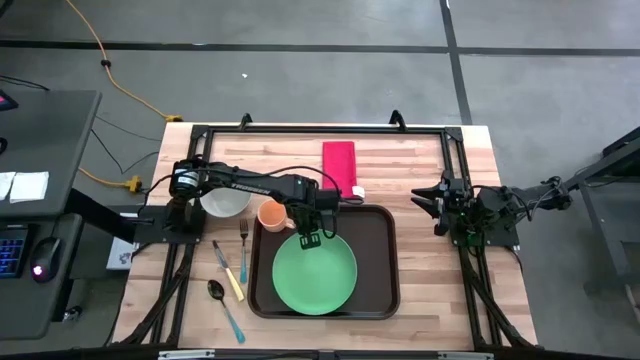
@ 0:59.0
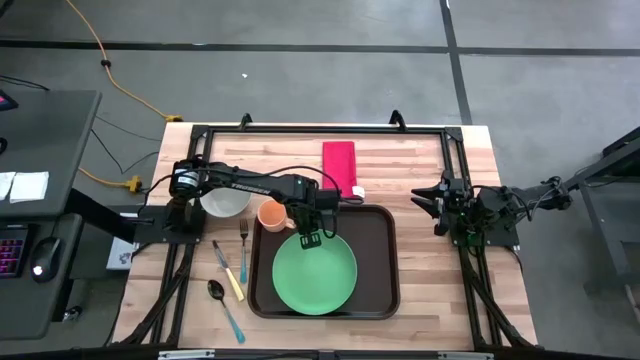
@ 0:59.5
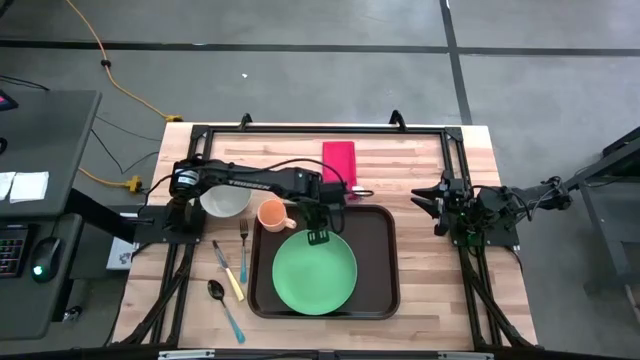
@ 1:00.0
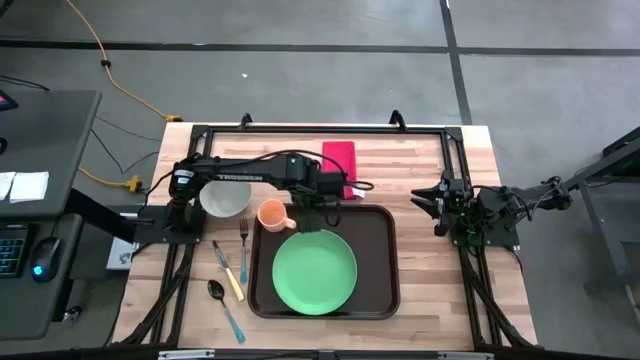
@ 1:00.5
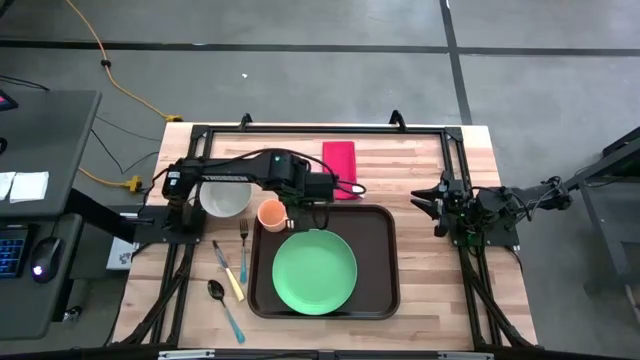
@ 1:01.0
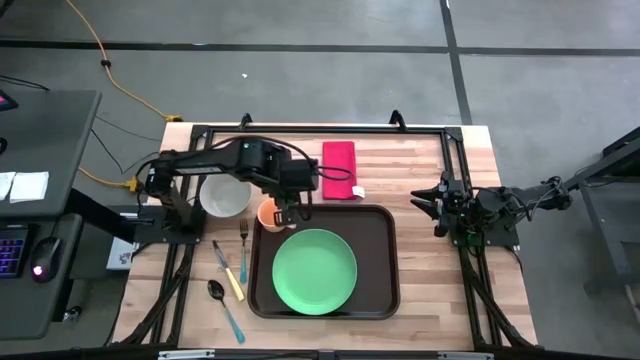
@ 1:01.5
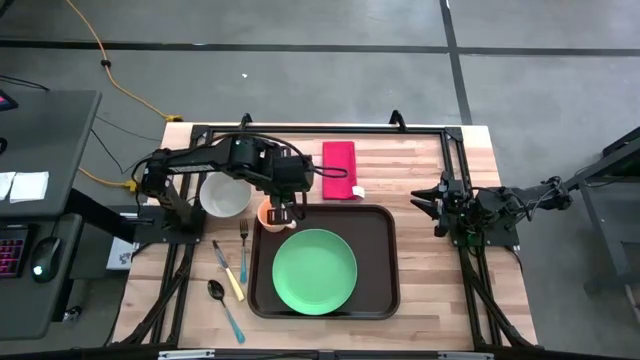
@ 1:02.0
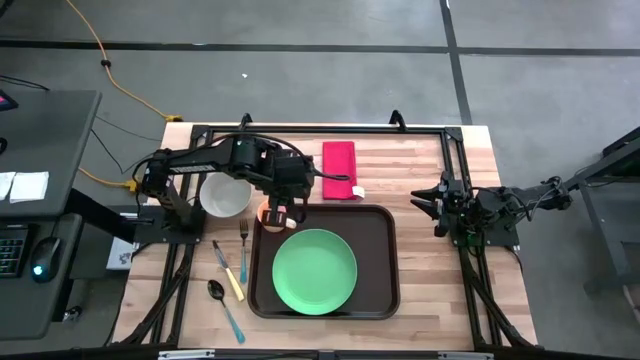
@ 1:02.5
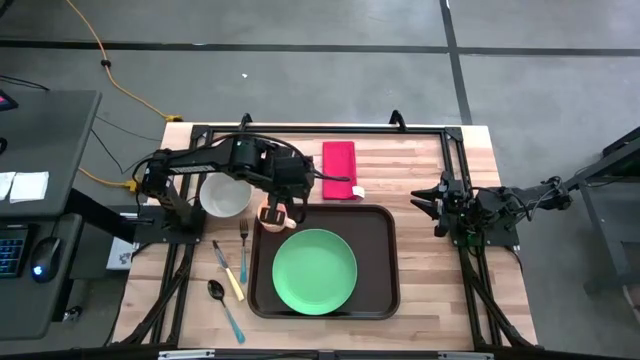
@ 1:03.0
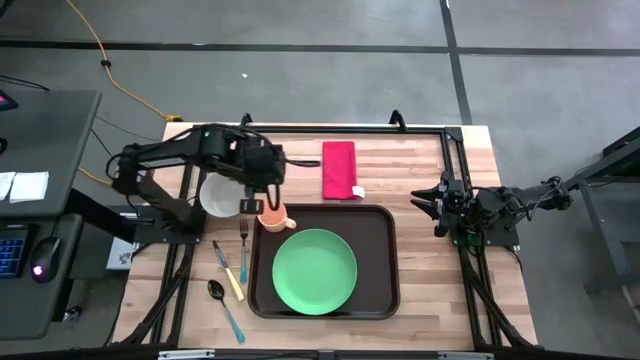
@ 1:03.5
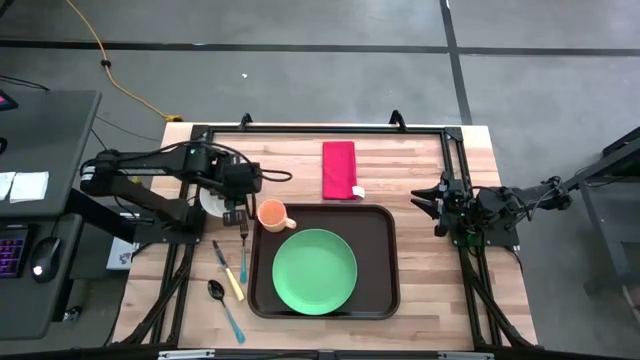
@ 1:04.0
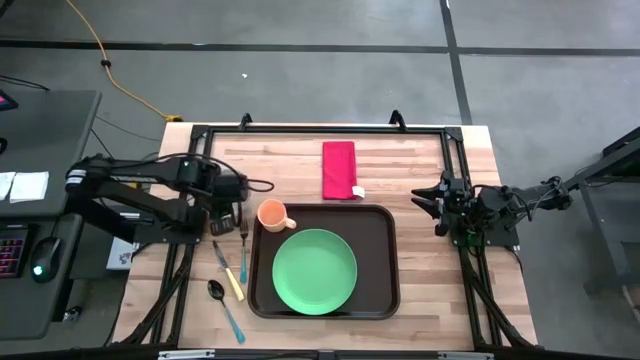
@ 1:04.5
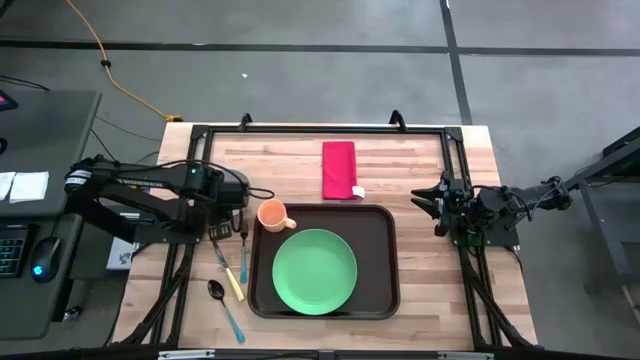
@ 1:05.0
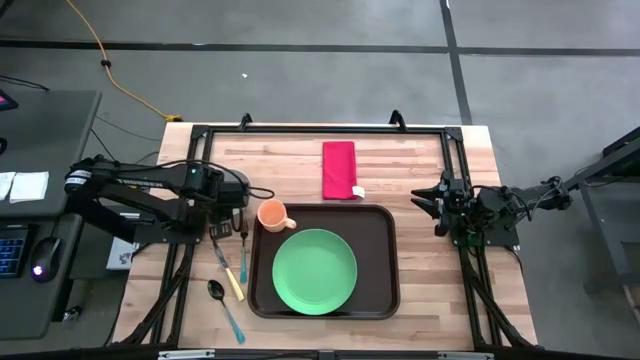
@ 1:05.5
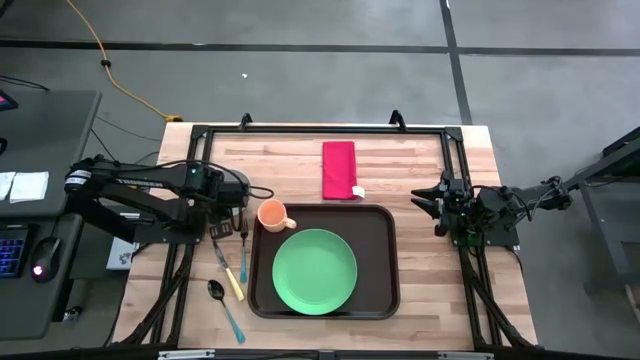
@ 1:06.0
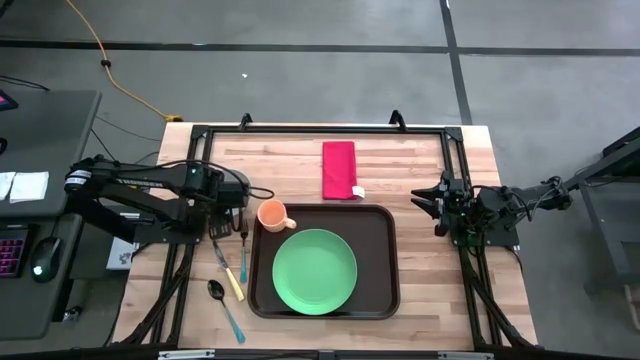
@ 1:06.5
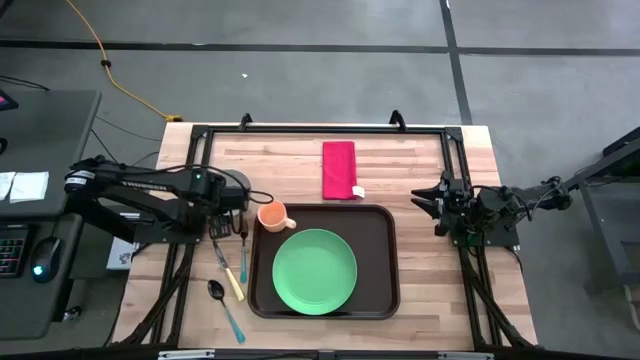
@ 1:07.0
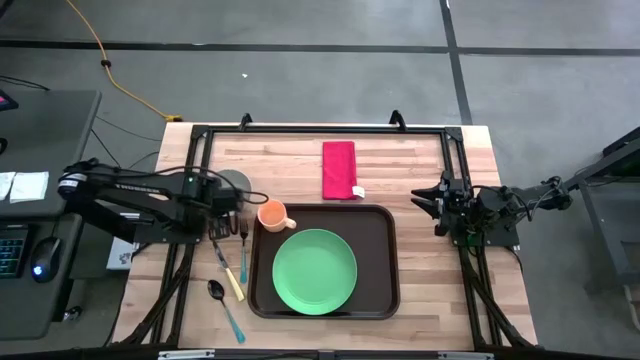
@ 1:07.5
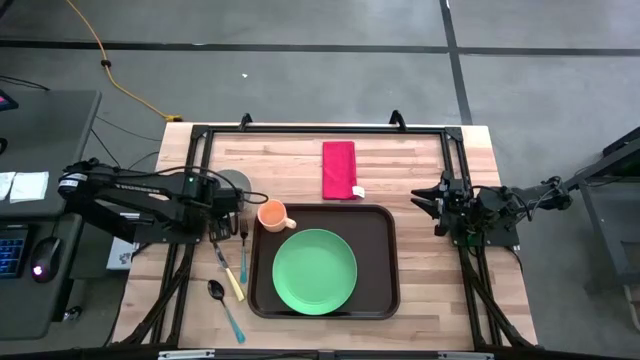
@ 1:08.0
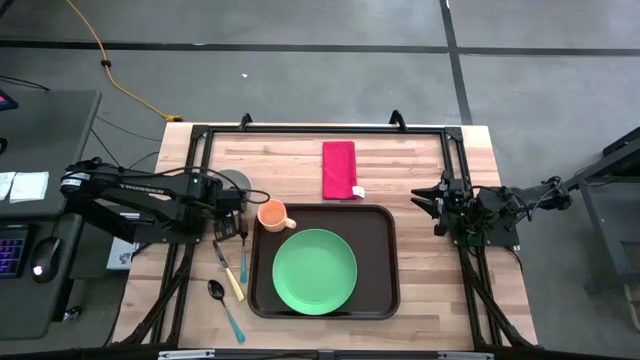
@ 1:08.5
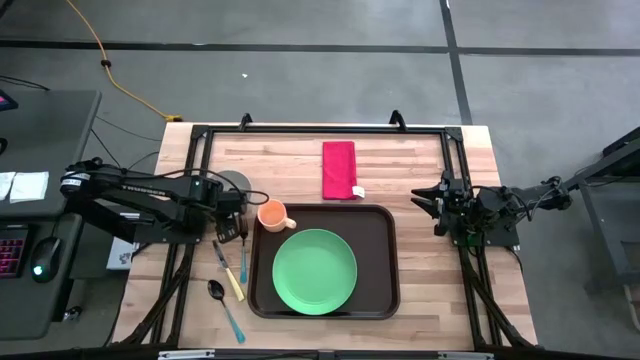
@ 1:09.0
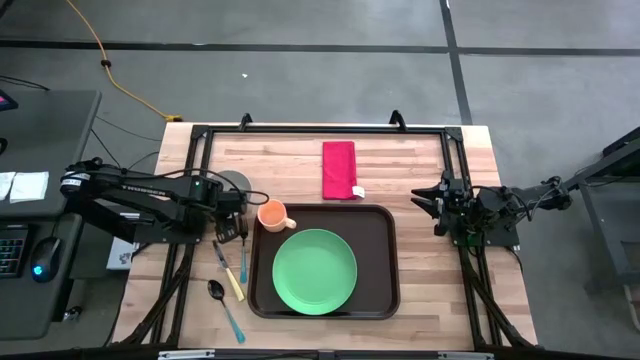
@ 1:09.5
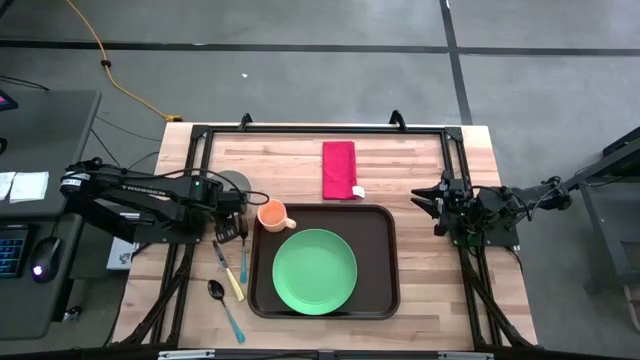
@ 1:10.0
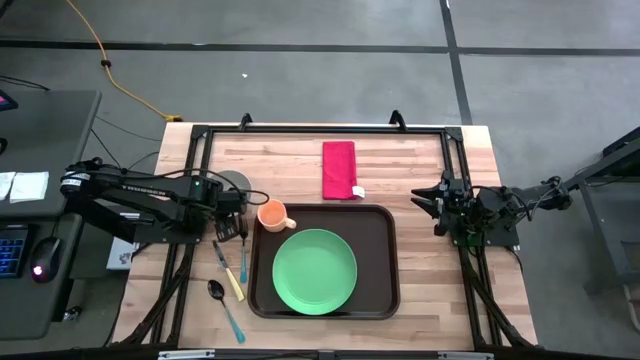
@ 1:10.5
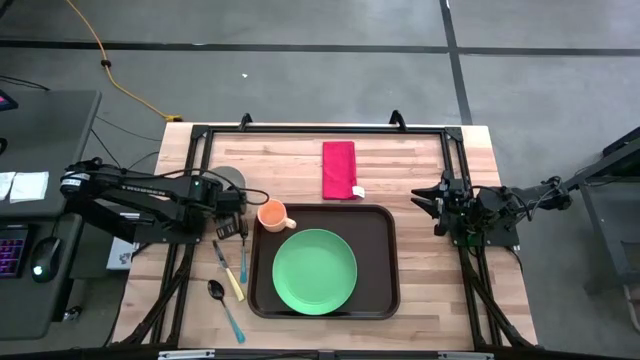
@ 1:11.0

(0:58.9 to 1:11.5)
Task: Set up tray
Put the gray bowl on the green plate

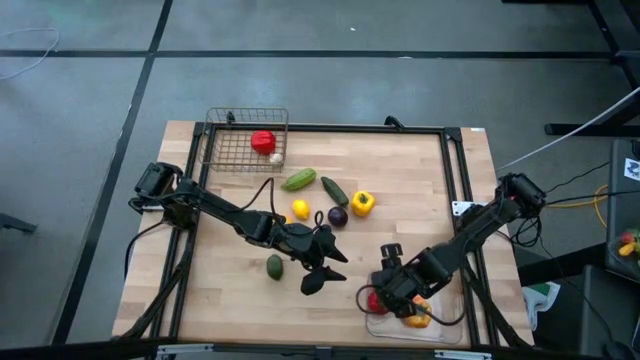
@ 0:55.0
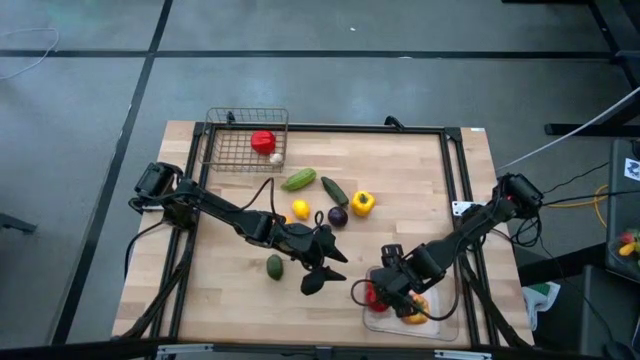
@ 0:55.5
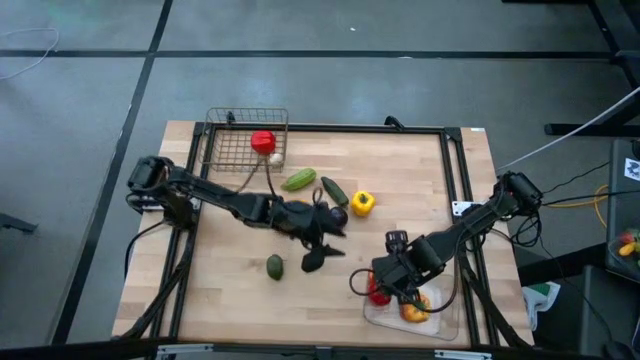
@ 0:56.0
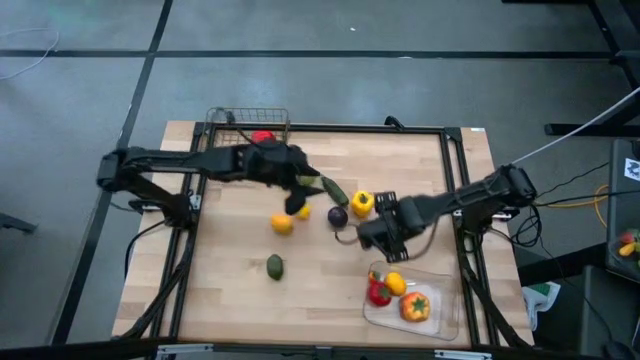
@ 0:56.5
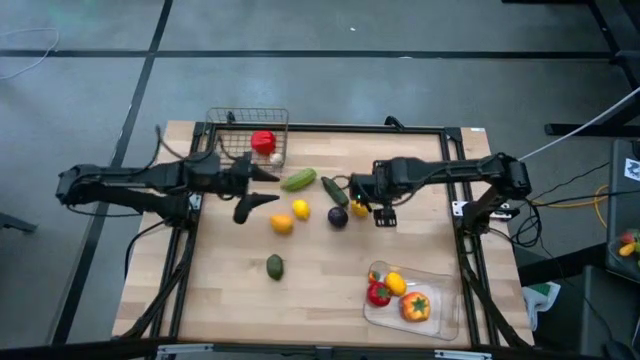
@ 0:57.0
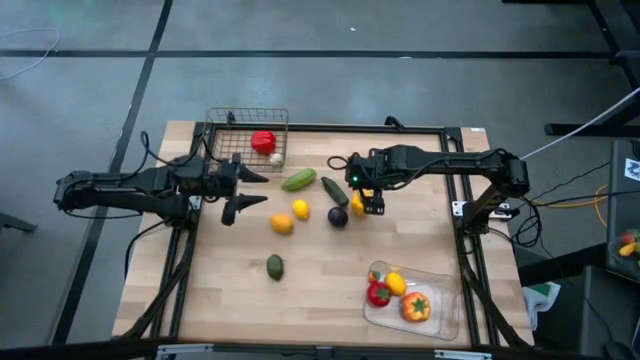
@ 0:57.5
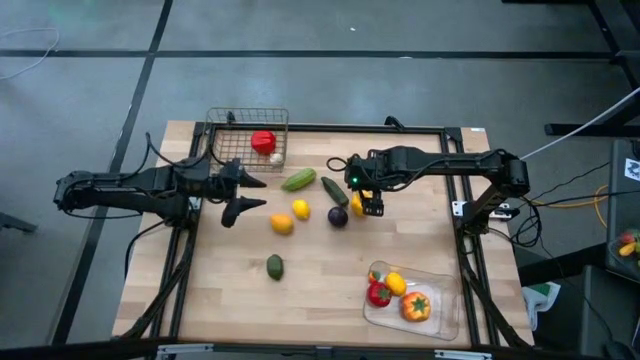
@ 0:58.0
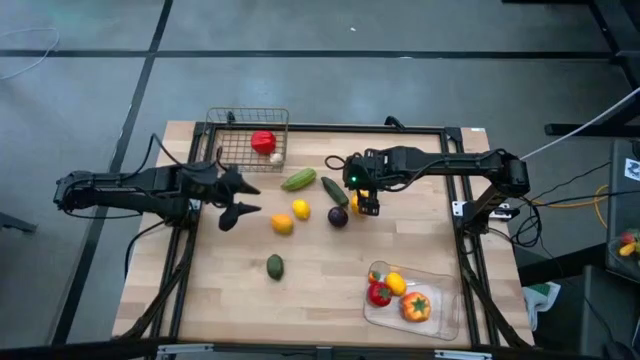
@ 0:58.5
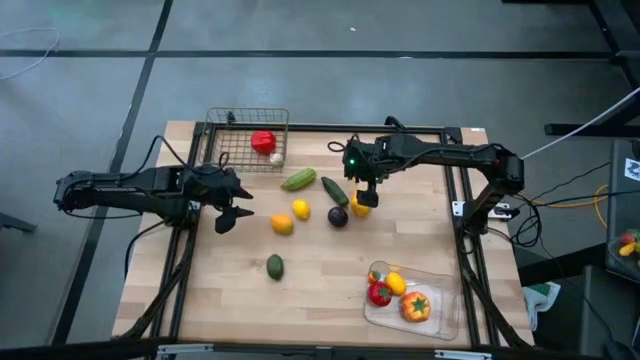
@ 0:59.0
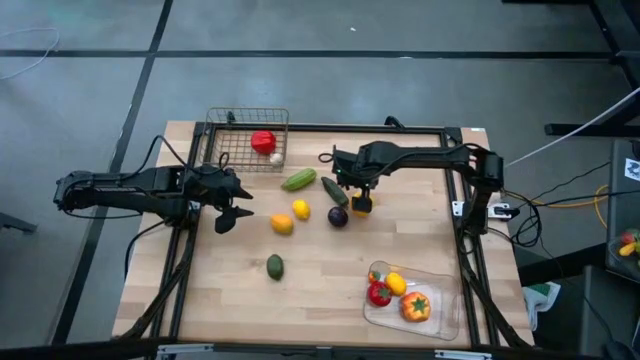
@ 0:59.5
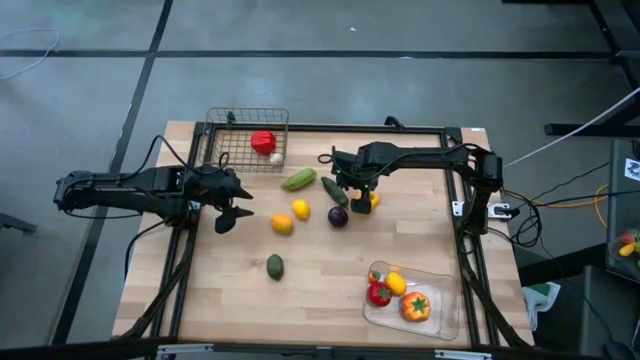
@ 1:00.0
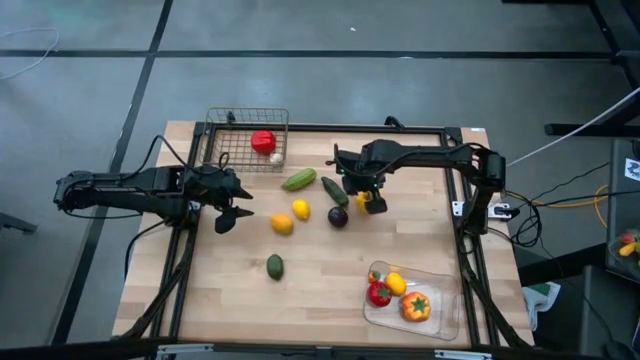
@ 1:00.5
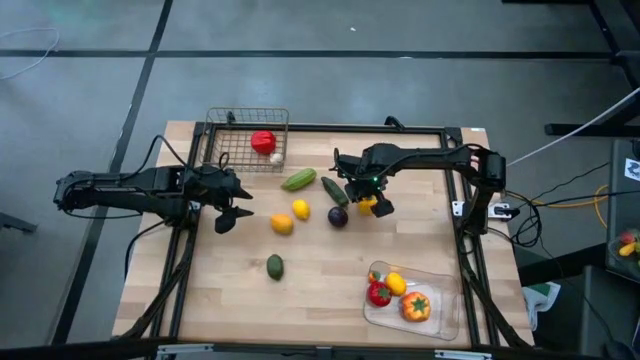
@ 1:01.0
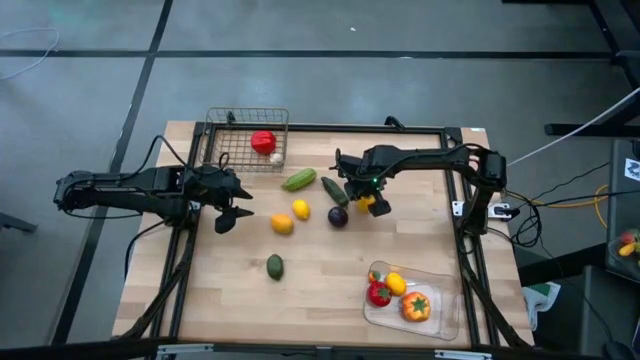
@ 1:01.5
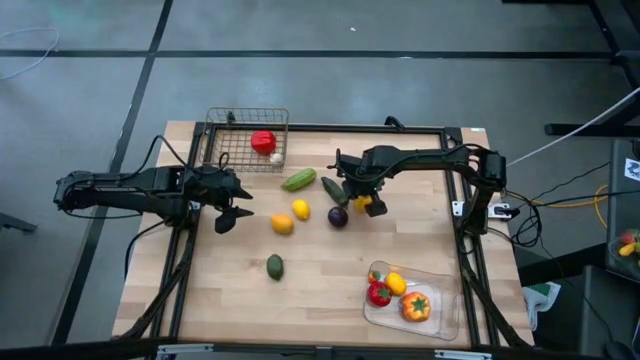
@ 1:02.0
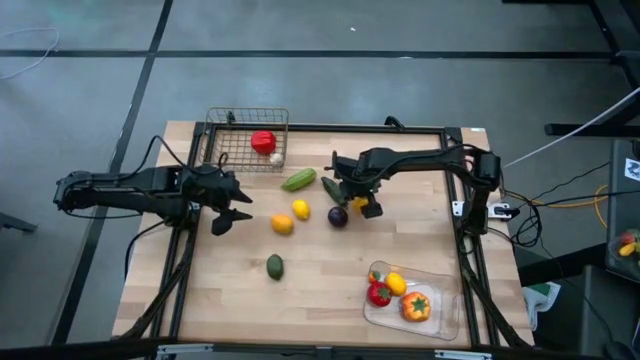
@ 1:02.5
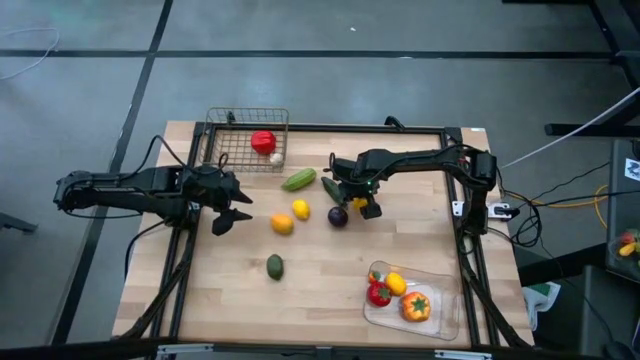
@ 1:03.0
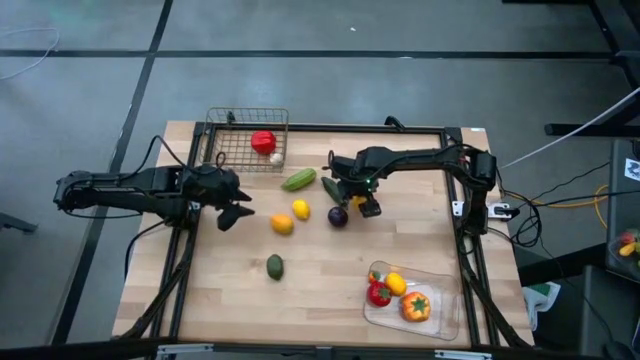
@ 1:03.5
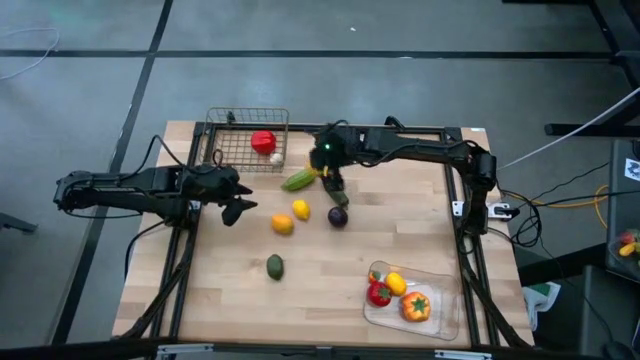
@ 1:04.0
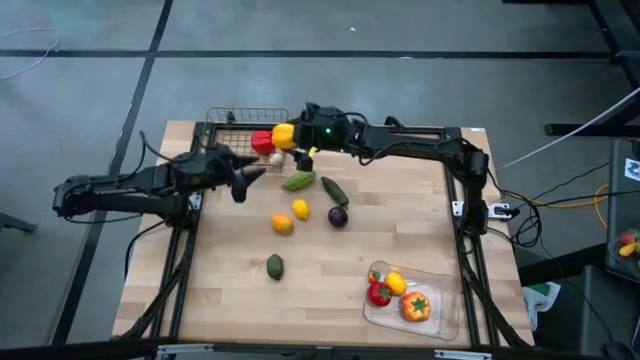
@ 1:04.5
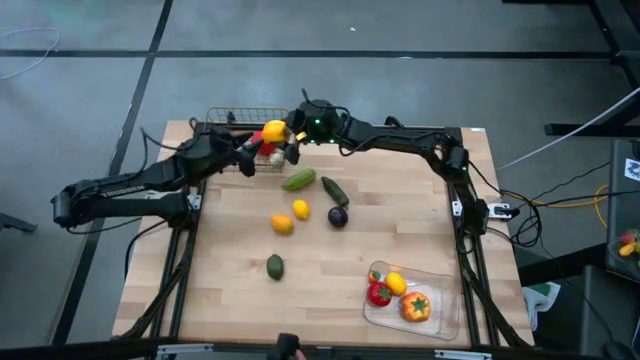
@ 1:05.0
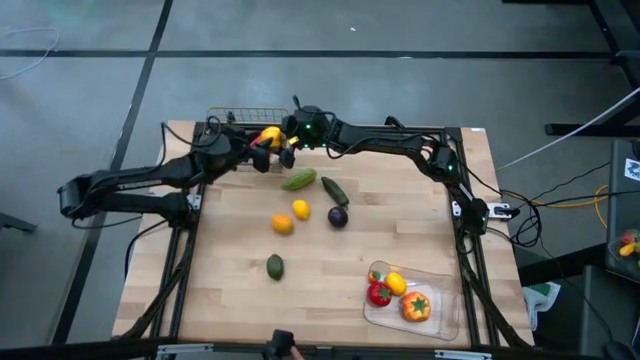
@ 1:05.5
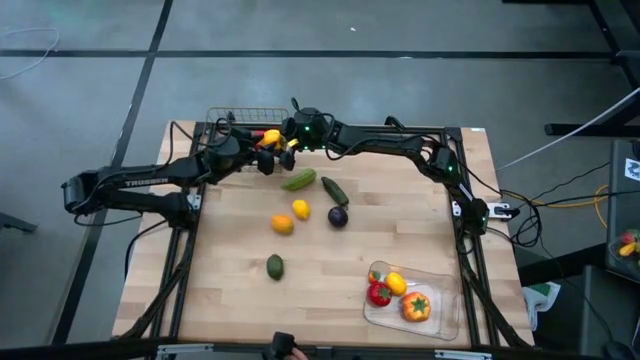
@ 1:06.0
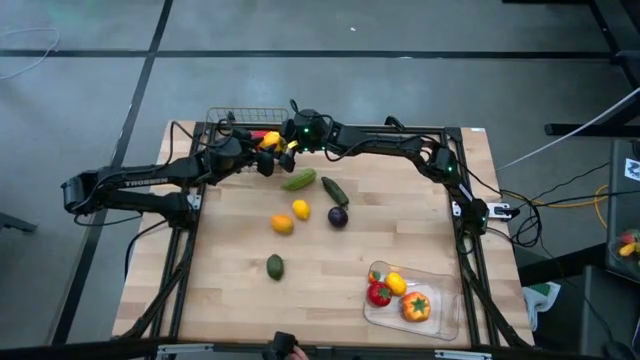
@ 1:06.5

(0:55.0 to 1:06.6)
Task: Sort produce into baskets
Put the yellow bell pepper into the mesh basket
